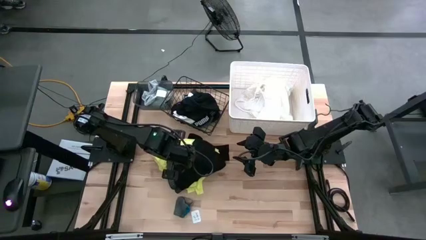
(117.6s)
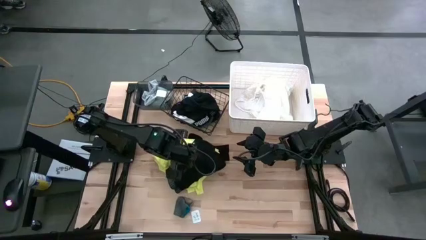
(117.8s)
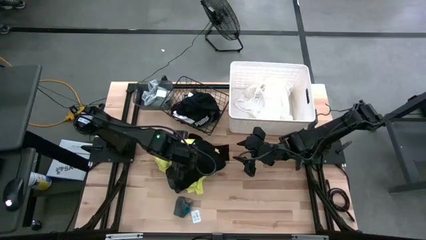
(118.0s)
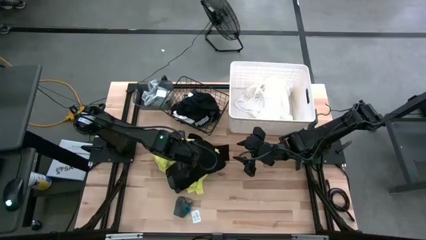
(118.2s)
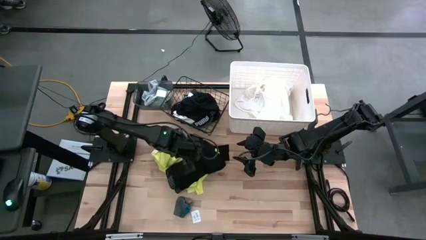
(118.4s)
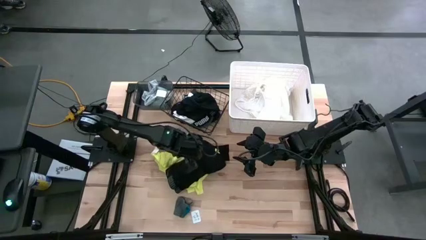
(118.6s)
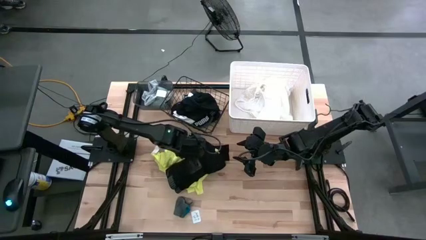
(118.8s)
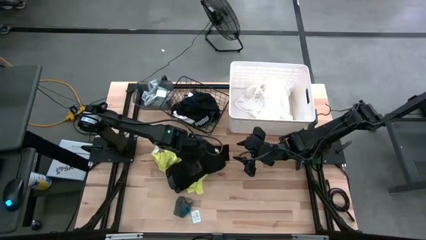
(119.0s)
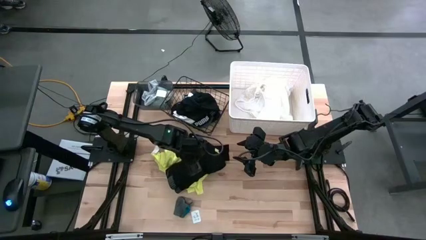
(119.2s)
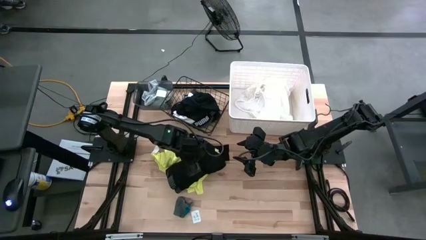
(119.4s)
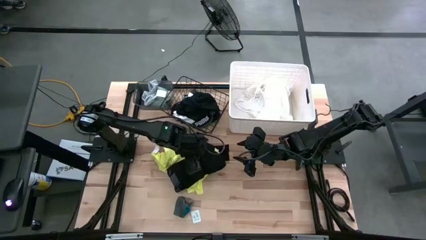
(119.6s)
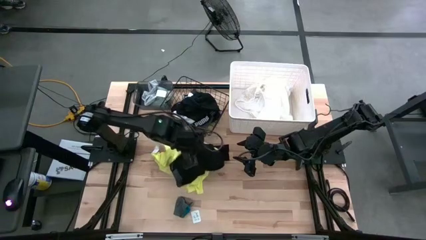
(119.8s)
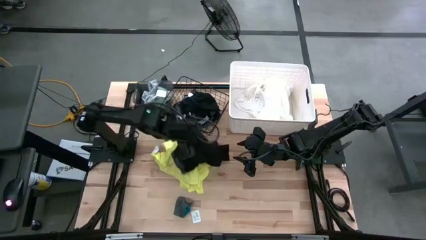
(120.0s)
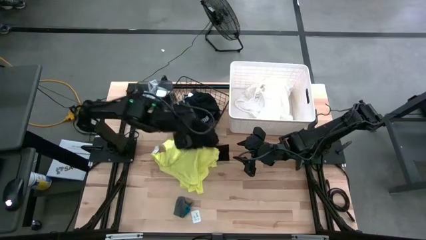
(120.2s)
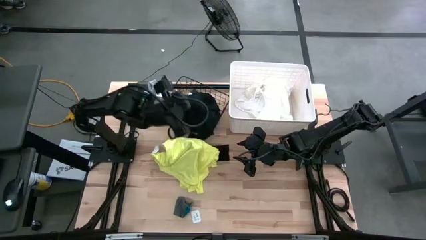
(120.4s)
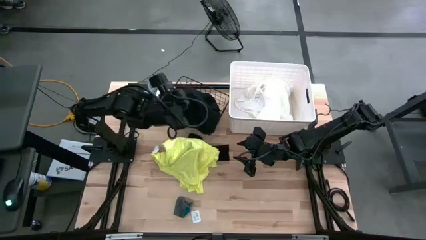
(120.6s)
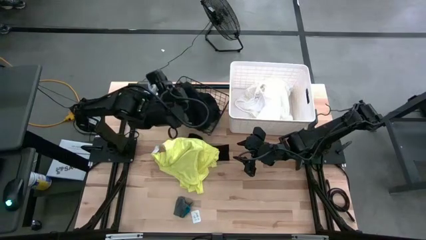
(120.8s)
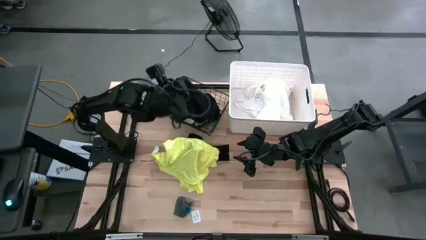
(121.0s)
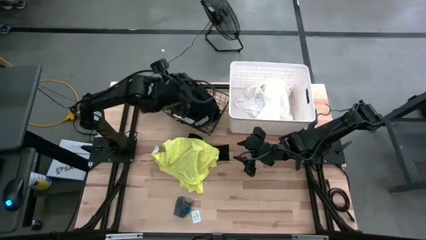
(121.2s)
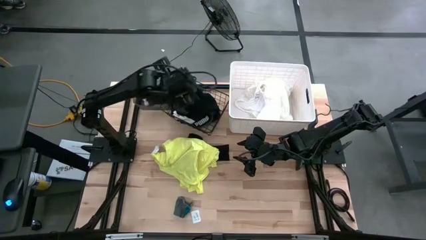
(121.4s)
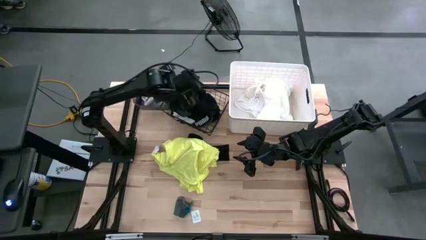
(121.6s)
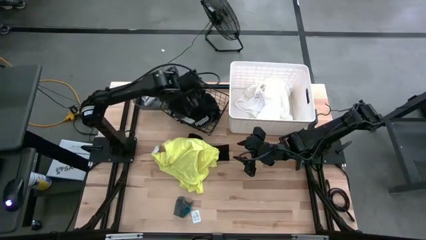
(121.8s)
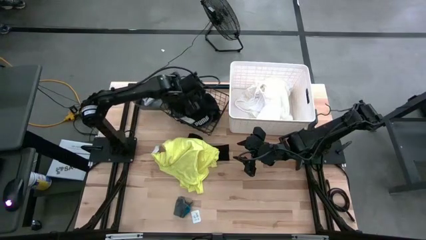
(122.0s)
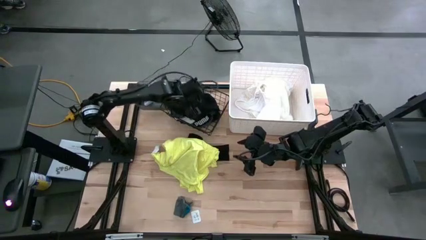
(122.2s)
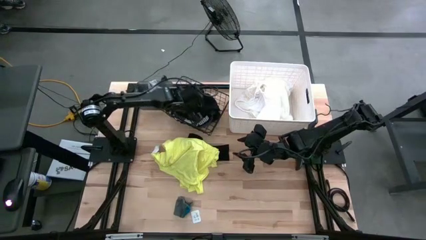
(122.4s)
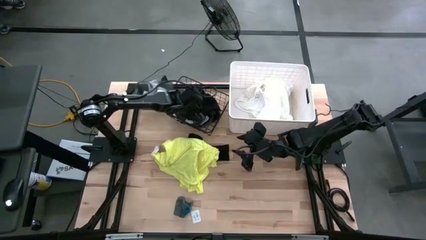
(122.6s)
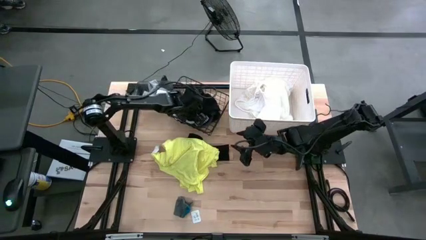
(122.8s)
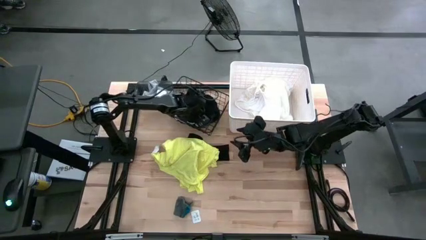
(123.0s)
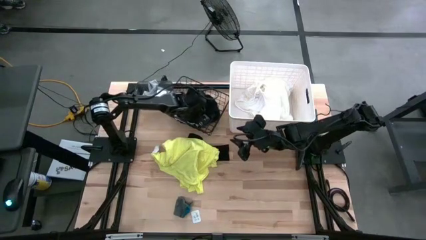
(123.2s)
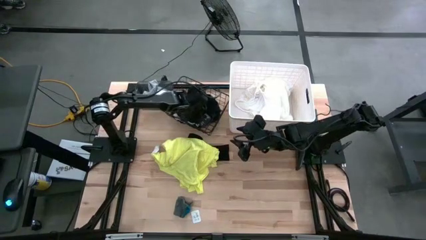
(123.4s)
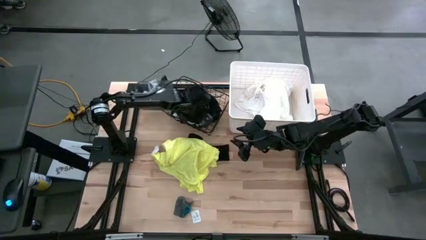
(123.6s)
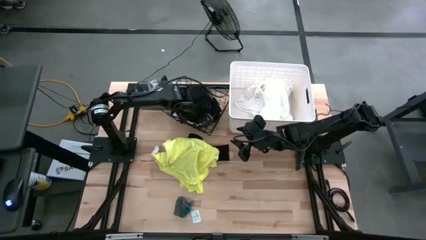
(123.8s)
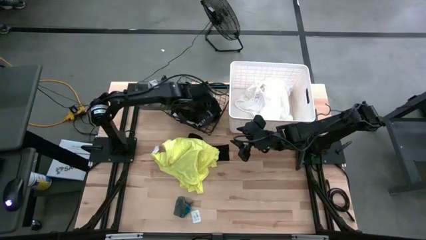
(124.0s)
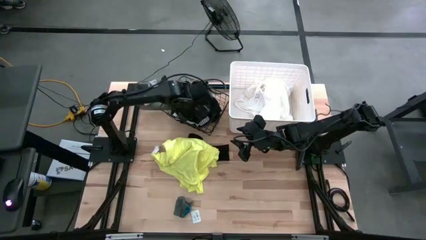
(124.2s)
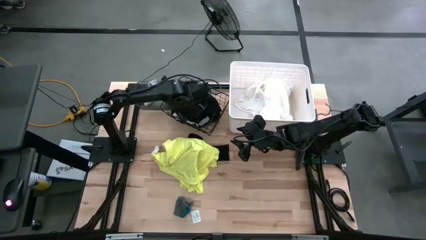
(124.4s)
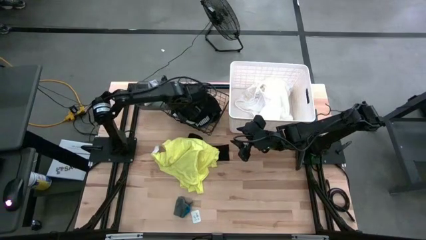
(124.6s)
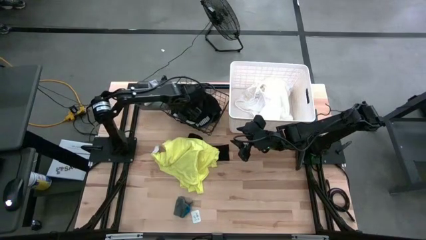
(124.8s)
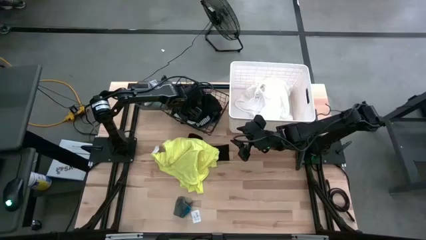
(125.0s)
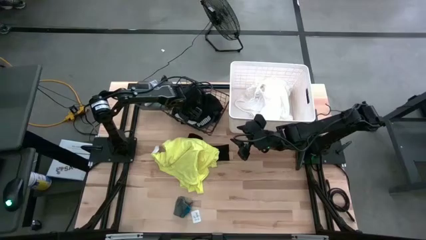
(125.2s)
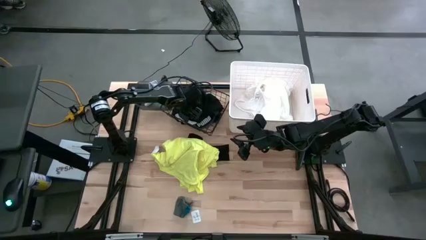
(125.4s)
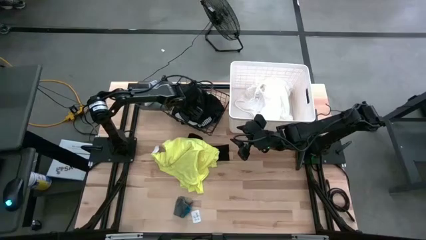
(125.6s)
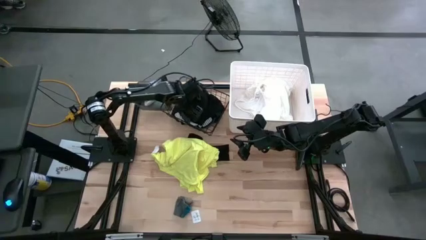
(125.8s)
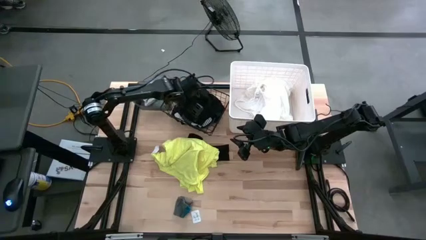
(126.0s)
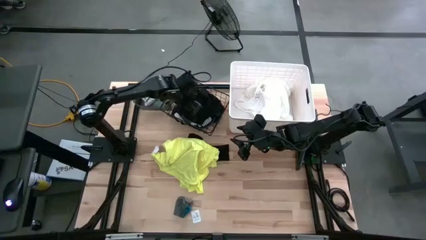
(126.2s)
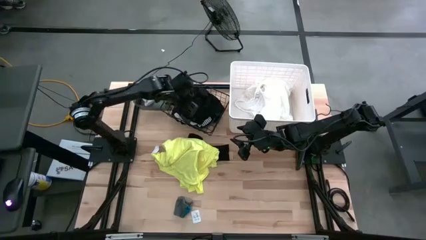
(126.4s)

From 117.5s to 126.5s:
Task: Pick & Place Cloths
Put the black underwear into the wire basket

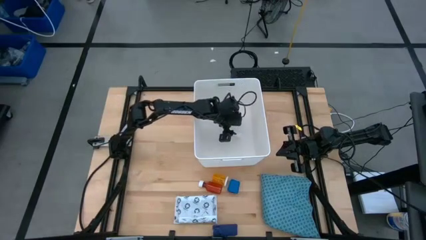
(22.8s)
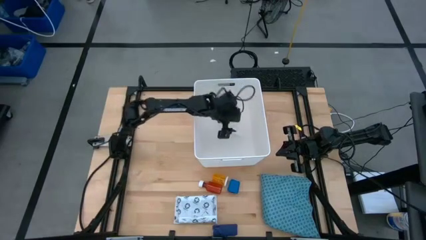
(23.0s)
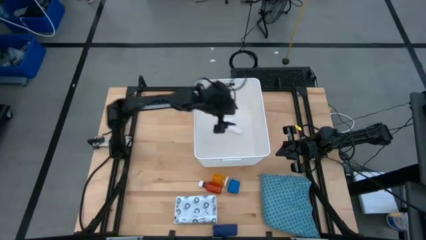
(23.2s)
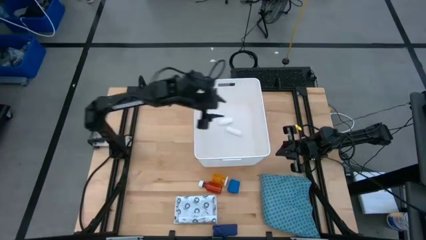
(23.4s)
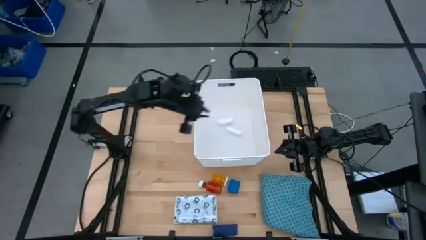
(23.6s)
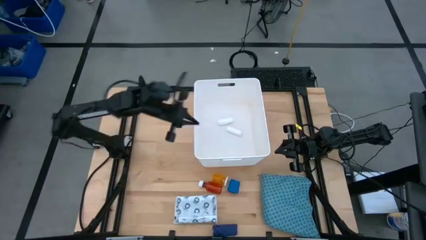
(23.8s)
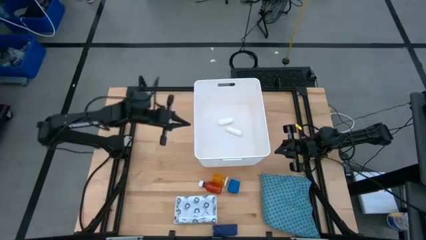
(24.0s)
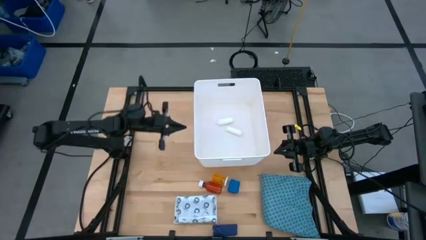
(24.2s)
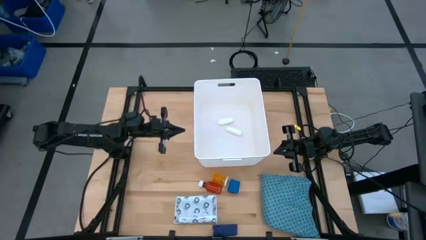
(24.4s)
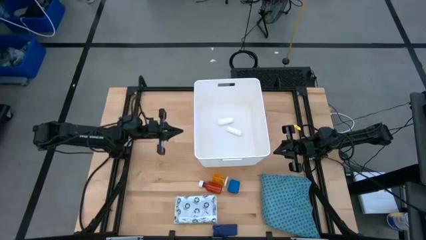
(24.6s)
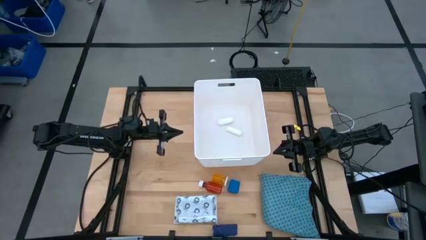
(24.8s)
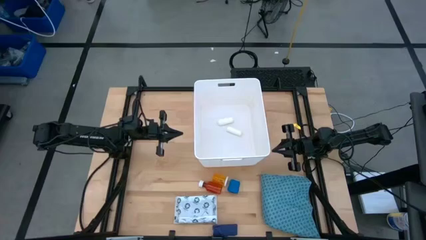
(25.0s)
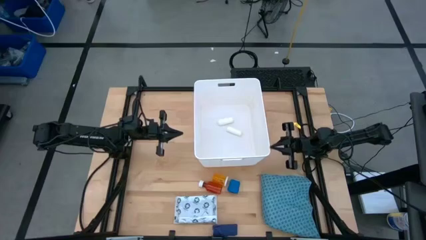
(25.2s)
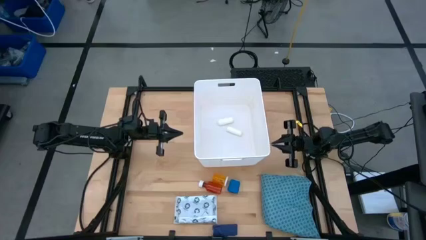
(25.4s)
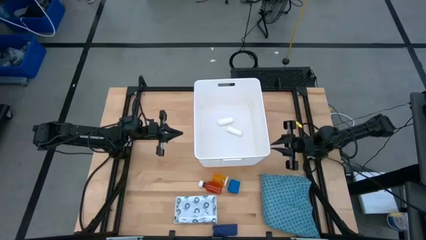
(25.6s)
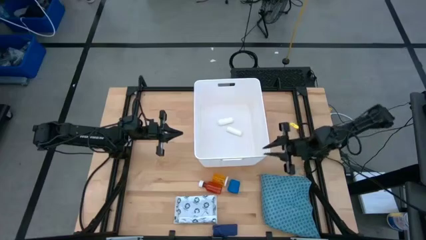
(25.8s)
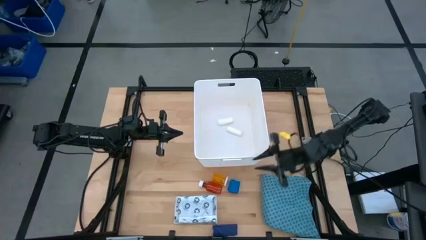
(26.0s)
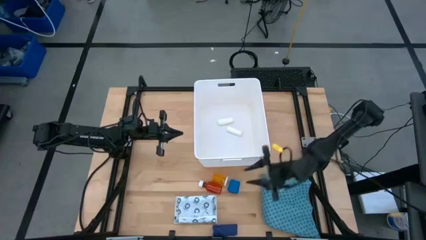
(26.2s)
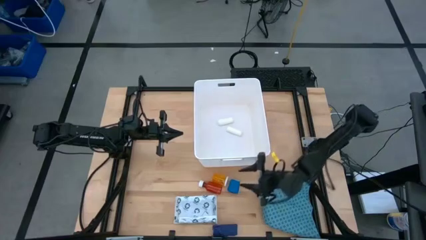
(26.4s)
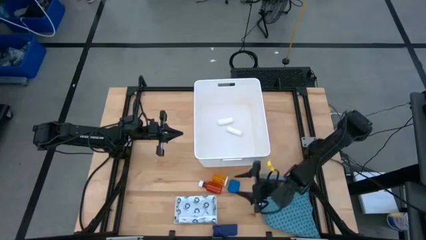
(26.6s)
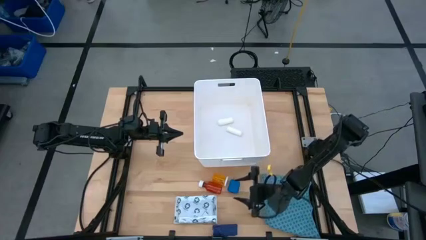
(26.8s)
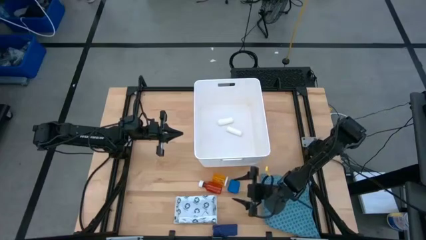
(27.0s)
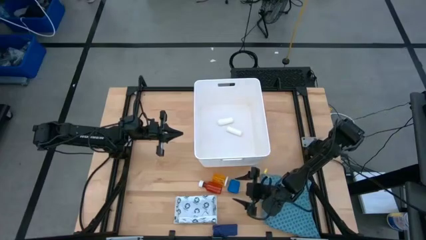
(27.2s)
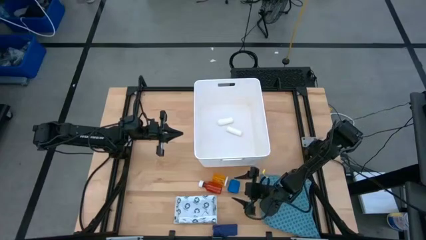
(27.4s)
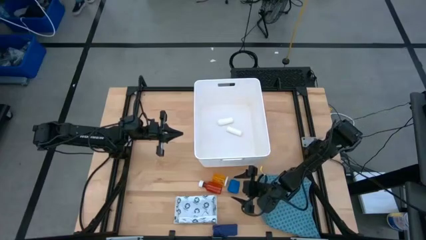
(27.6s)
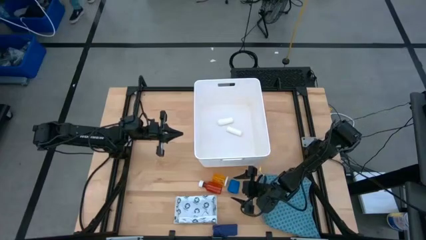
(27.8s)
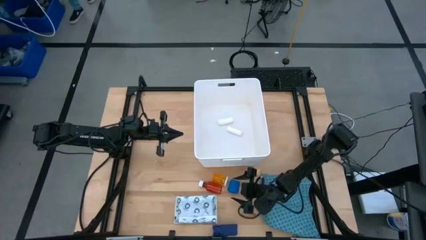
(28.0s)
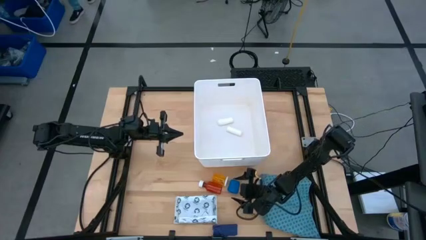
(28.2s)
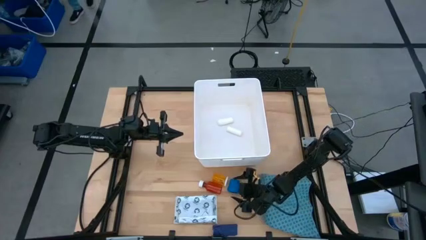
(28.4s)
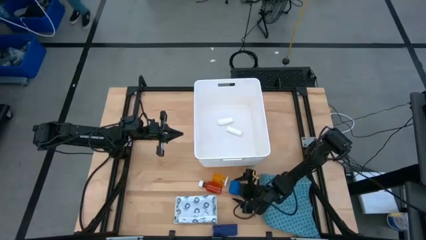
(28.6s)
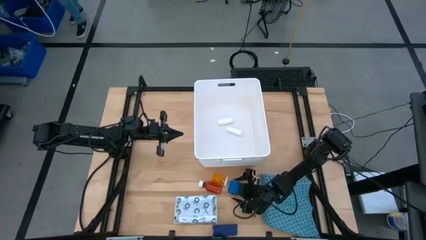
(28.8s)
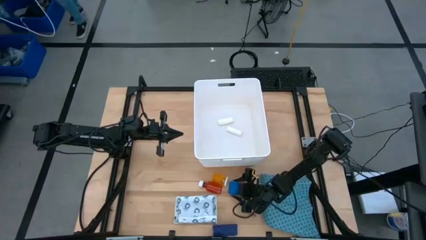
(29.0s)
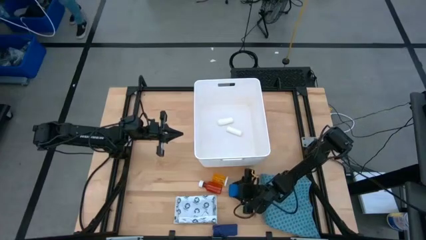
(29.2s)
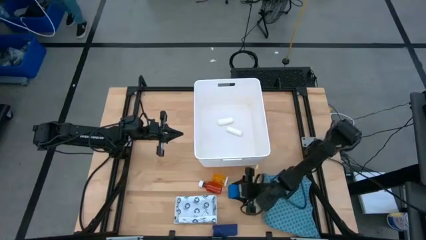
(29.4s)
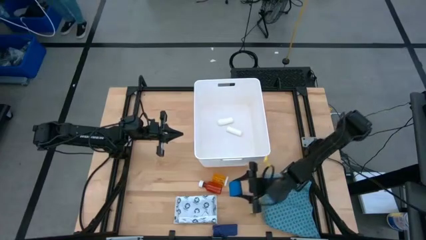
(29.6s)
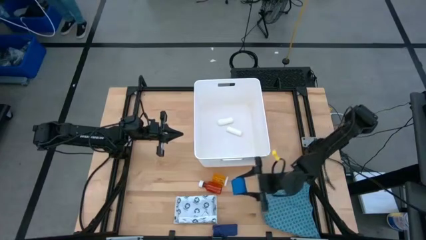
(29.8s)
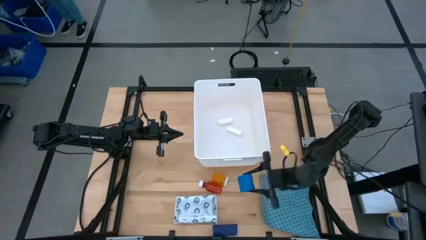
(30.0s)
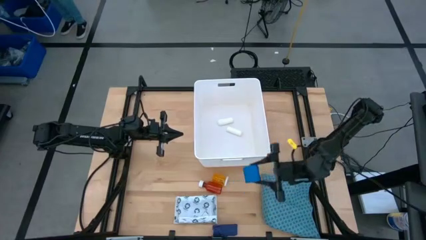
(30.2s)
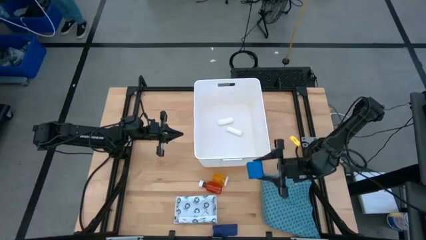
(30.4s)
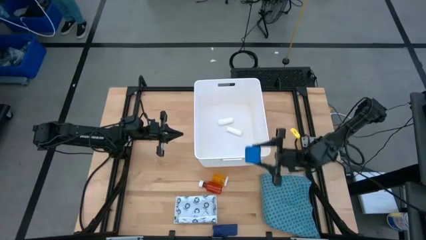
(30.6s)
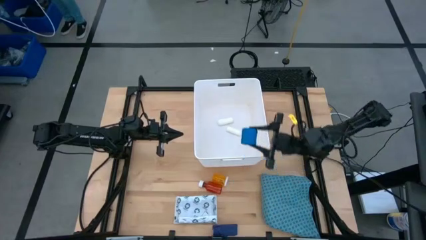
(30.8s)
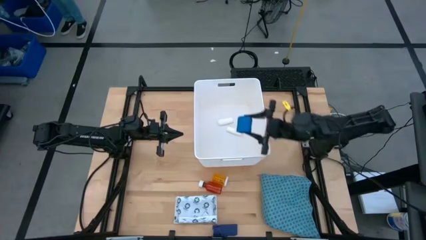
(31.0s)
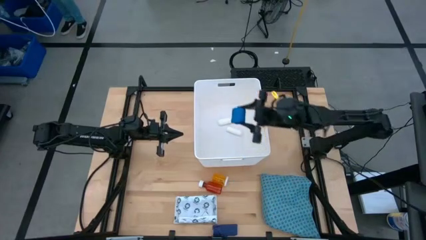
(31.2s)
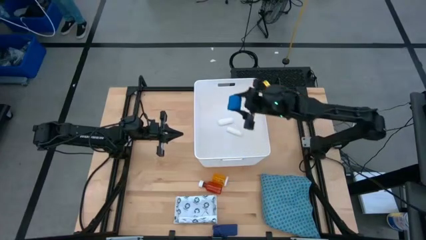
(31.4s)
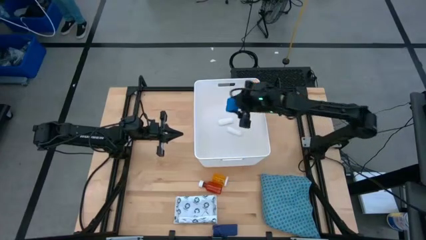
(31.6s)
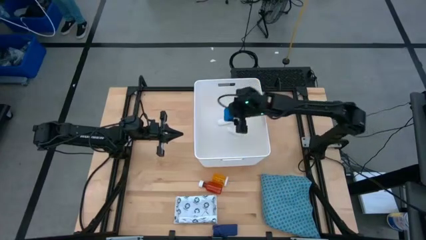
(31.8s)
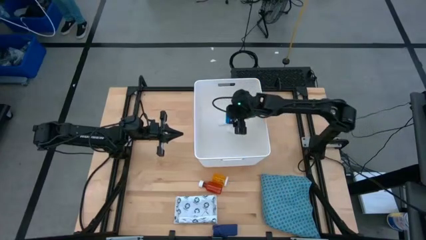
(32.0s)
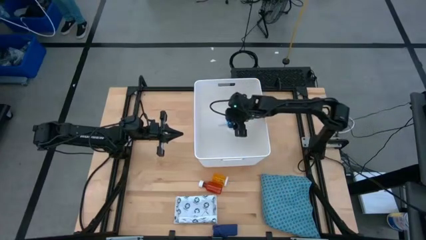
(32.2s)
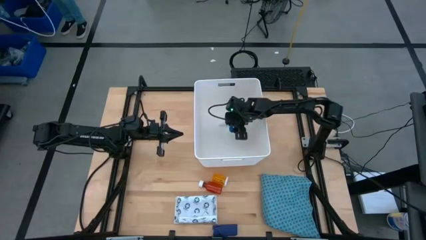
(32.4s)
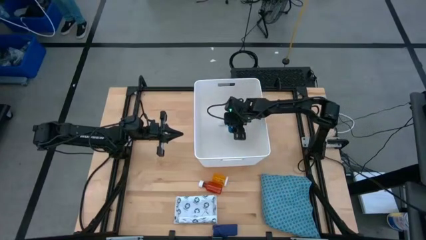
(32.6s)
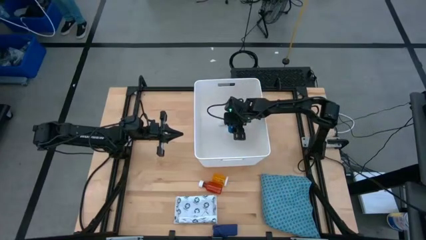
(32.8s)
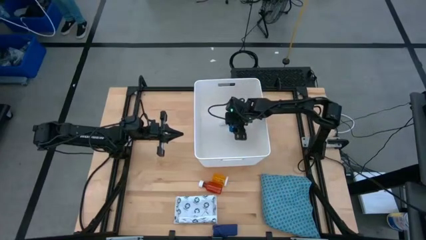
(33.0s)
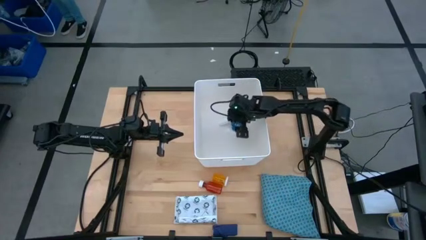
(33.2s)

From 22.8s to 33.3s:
Task: Pick & place medical supplies in basket/bin
Put the rolled blue bandage into the white container
